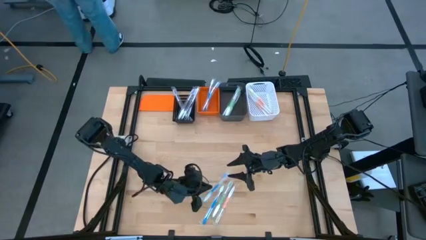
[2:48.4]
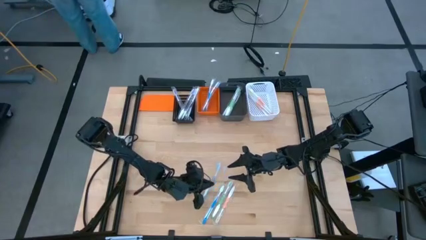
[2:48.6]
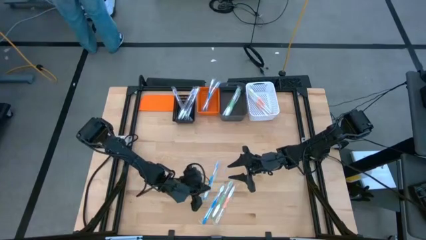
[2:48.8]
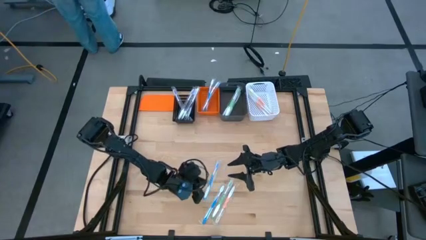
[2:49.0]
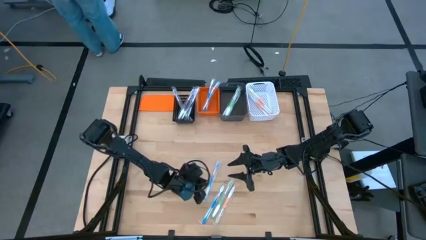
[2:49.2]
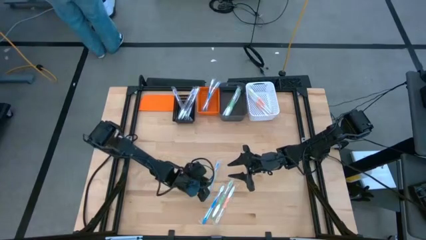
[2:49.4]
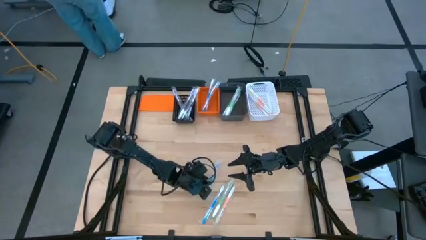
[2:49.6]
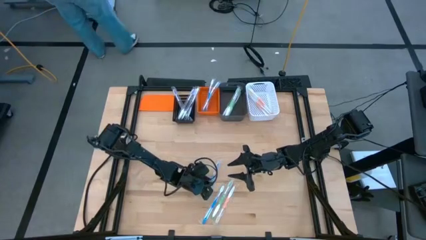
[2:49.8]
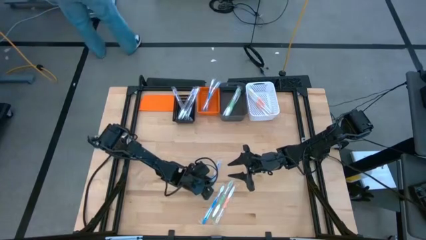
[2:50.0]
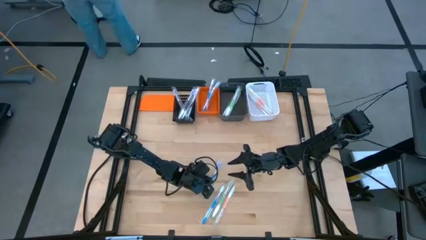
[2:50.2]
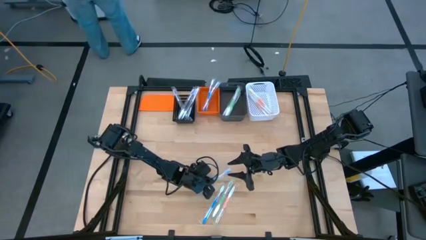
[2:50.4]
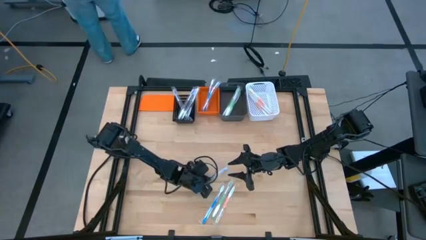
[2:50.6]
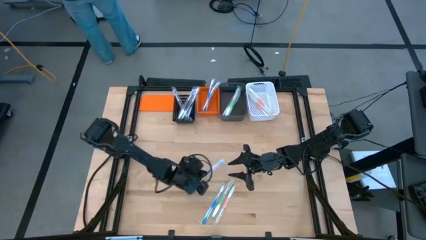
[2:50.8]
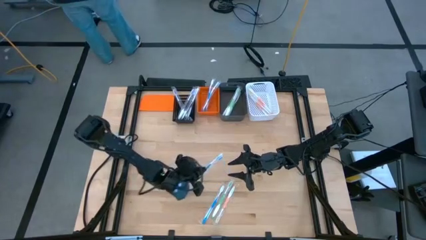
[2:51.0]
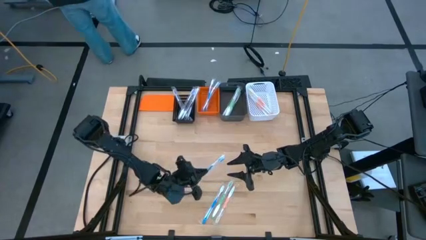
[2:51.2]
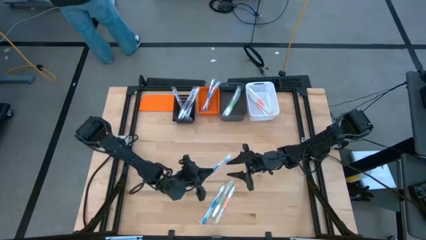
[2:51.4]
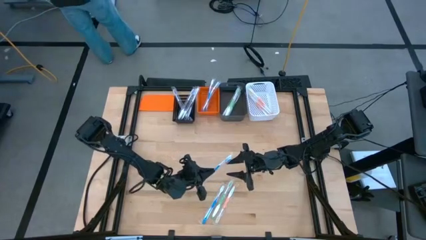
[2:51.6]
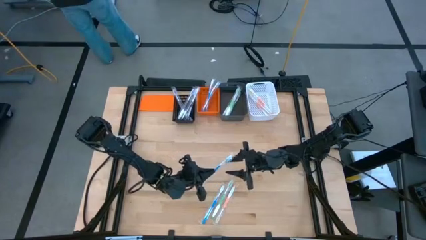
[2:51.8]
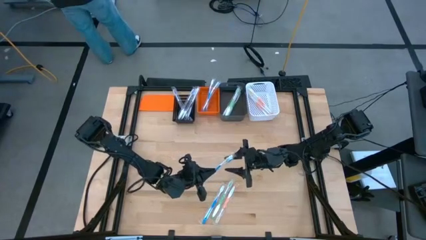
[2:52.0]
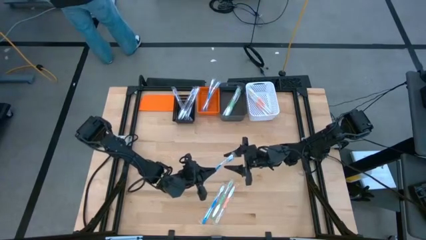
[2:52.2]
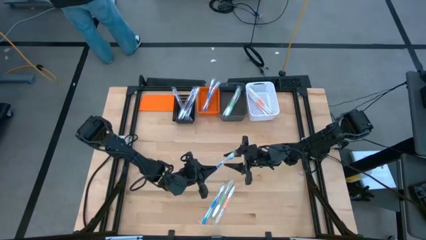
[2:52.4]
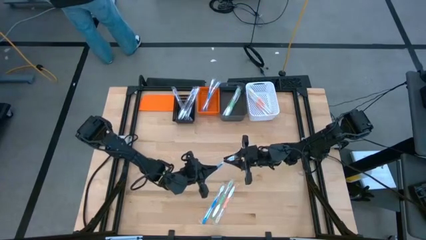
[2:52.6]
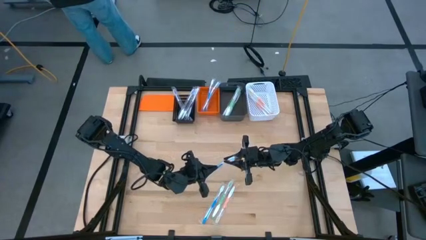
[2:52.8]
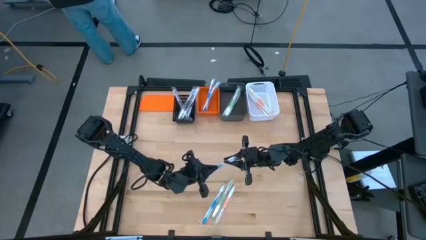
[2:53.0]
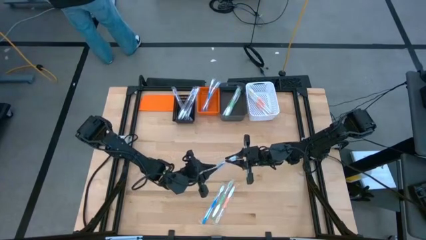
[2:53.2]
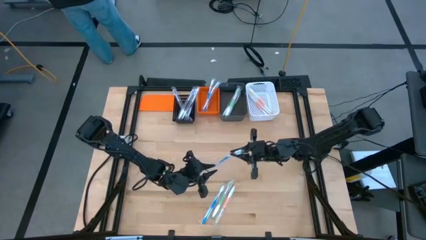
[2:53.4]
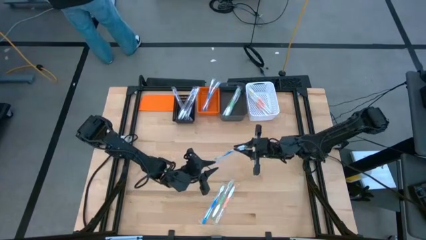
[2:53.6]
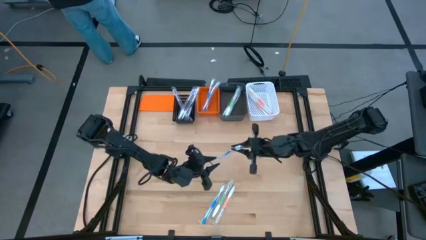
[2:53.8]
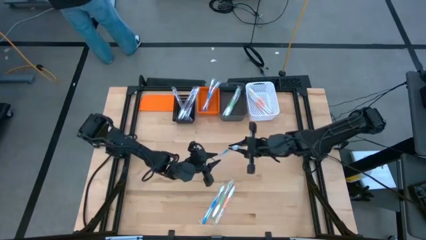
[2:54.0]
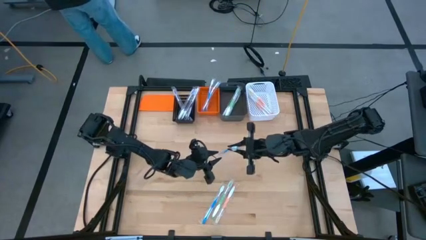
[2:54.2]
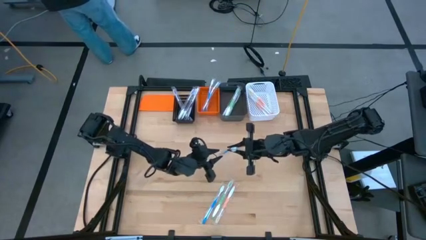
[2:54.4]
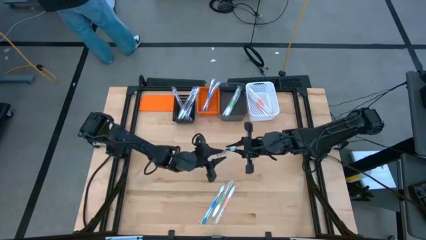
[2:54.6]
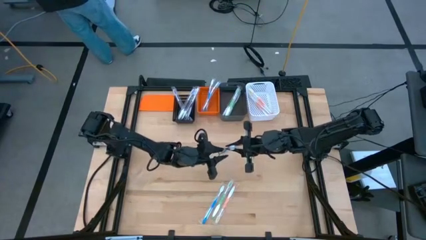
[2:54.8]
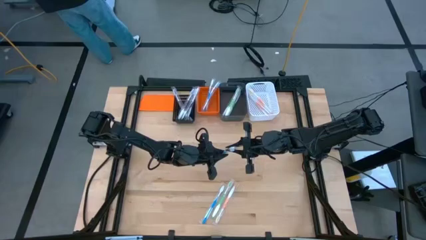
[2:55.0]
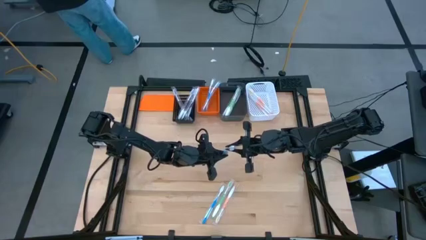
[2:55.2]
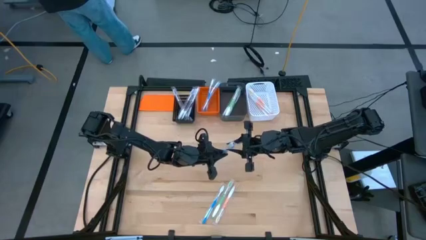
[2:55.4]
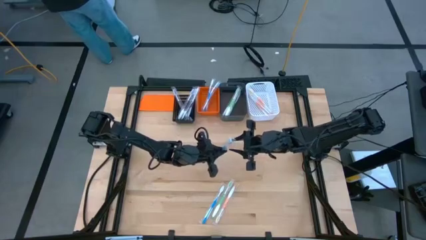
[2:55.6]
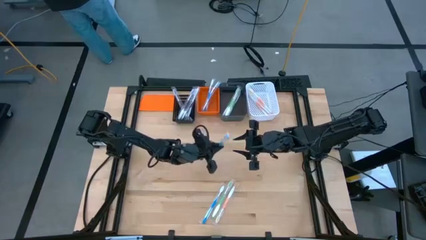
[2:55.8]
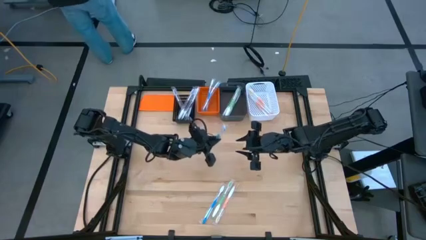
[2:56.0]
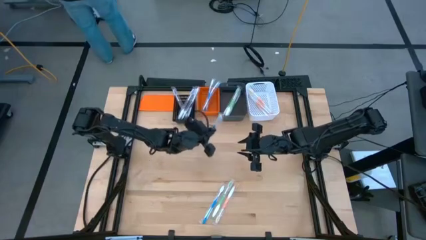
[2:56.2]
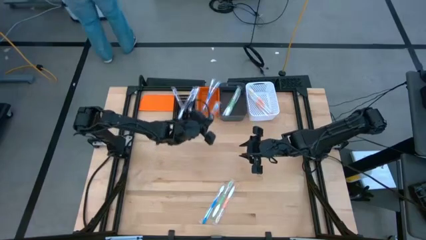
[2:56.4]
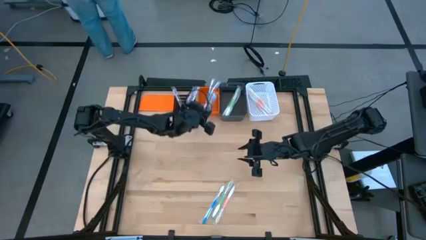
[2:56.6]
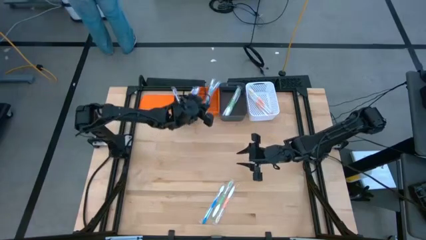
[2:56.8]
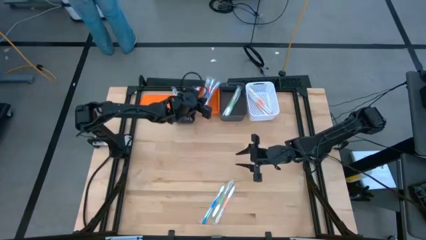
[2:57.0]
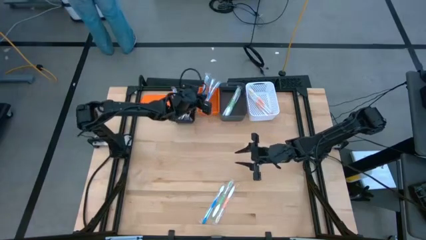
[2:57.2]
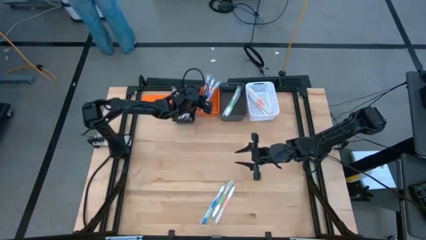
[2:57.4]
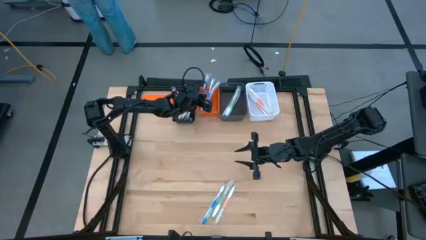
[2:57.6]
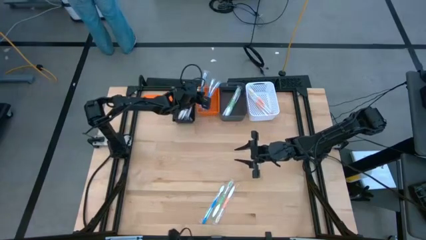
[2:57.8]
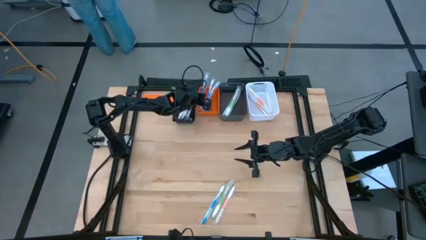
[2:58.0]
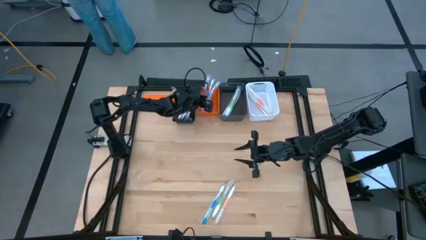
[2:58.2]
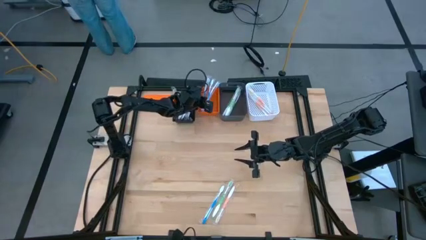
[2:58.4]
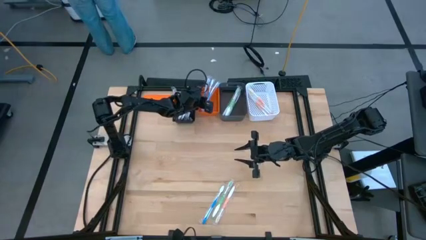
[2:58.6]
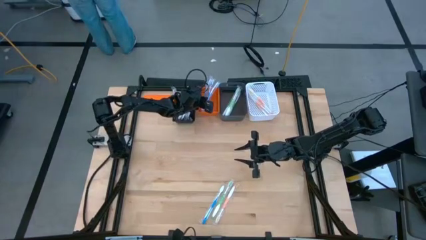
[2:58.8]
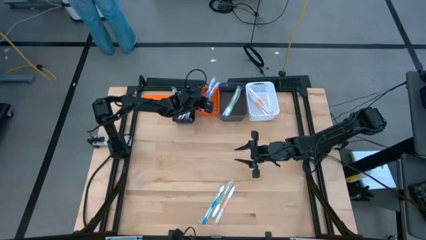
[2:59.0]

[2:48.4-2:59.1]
Task: Pick & Place Toothbrushes
Put the blue toothbrush into the orange basket

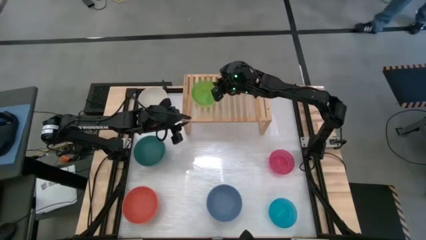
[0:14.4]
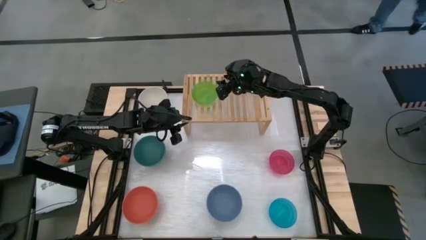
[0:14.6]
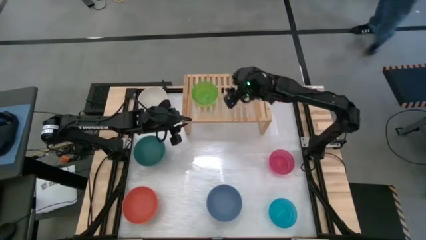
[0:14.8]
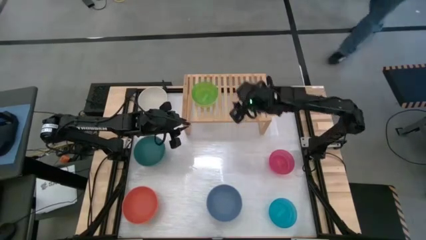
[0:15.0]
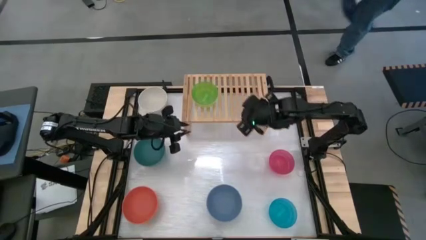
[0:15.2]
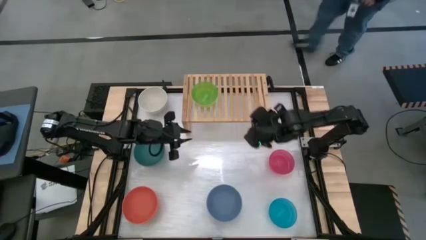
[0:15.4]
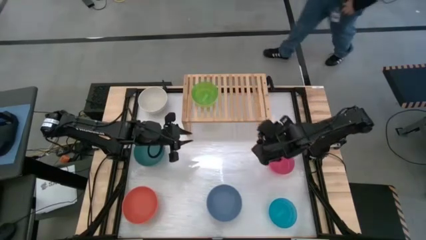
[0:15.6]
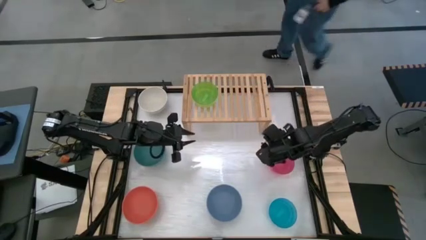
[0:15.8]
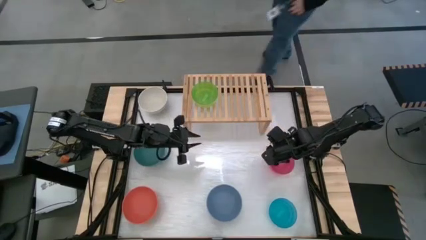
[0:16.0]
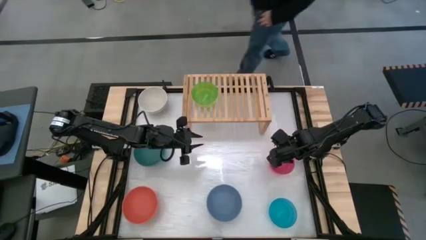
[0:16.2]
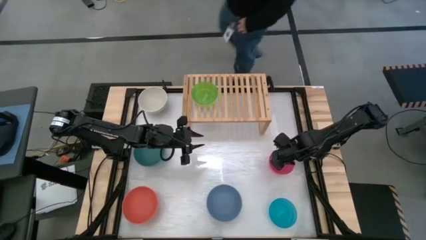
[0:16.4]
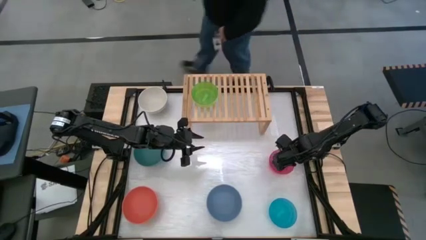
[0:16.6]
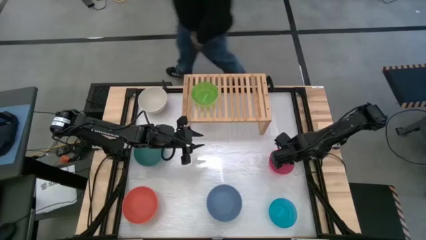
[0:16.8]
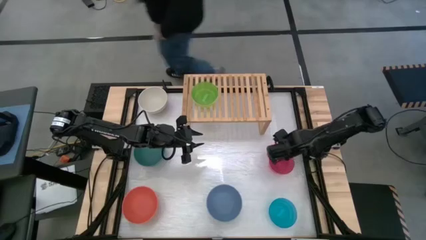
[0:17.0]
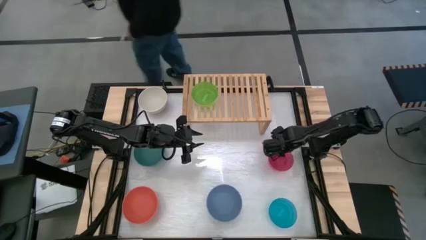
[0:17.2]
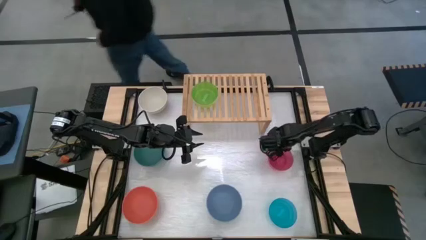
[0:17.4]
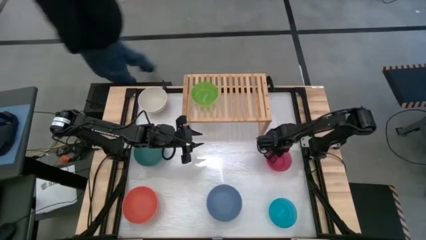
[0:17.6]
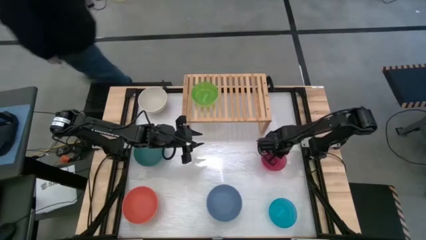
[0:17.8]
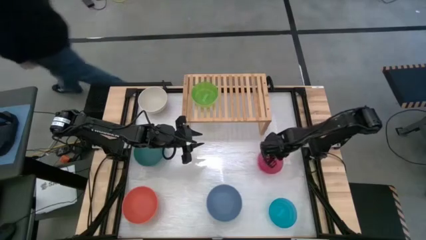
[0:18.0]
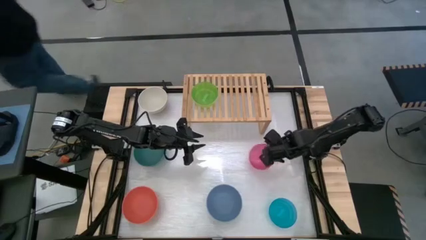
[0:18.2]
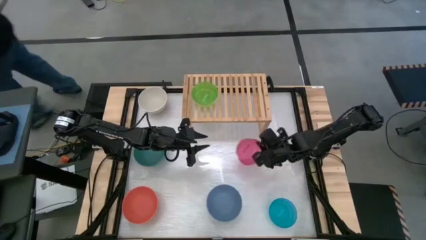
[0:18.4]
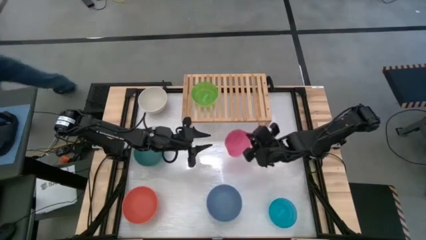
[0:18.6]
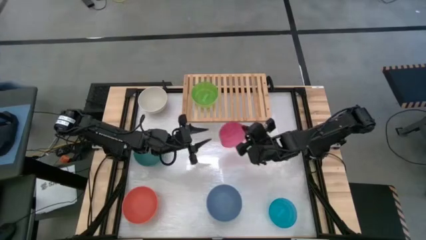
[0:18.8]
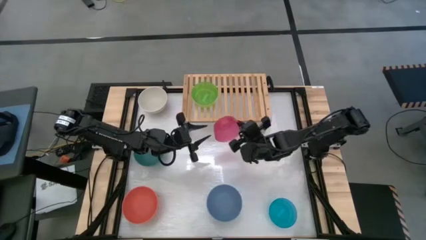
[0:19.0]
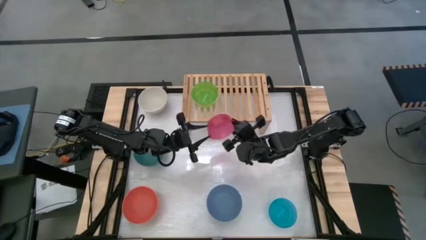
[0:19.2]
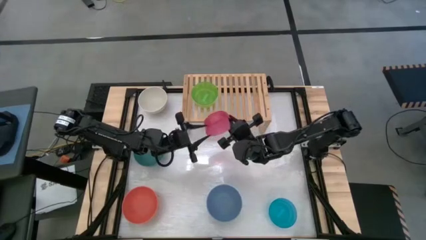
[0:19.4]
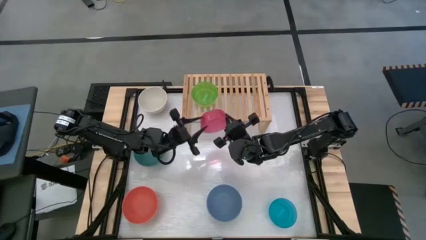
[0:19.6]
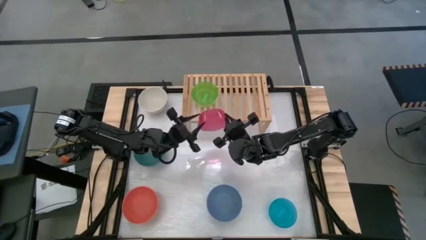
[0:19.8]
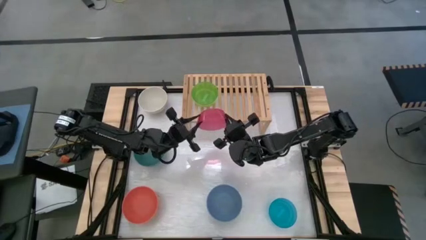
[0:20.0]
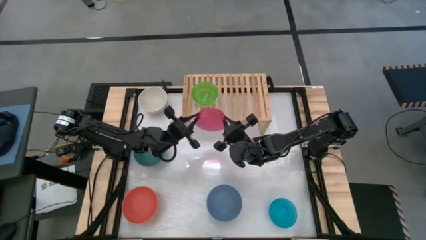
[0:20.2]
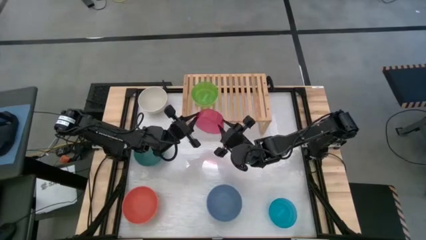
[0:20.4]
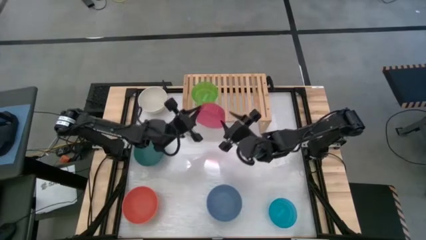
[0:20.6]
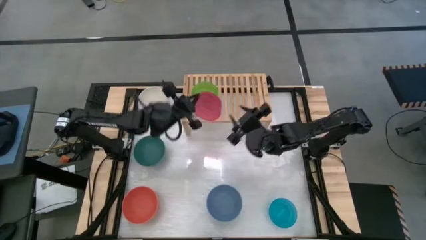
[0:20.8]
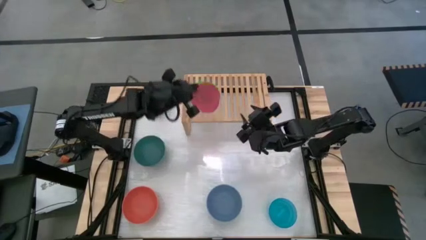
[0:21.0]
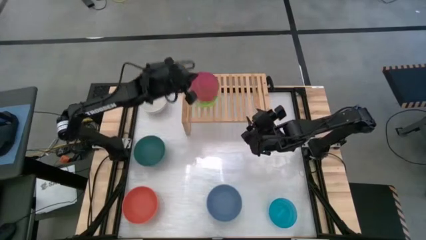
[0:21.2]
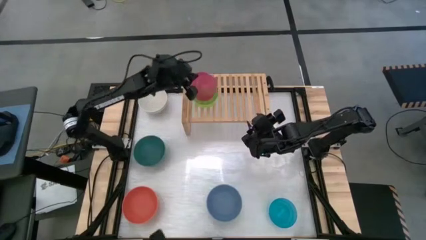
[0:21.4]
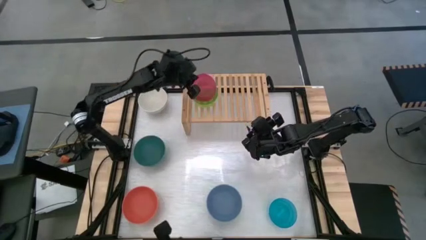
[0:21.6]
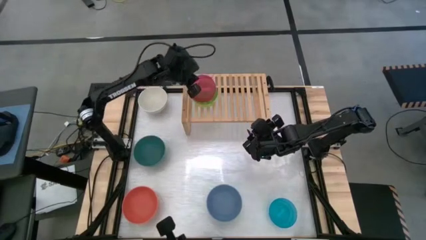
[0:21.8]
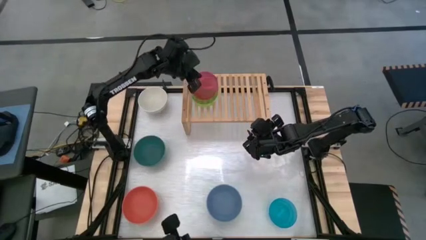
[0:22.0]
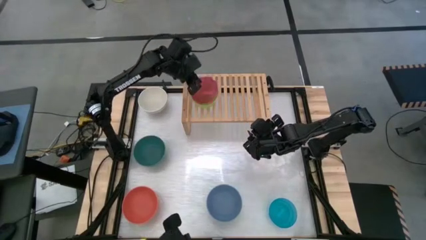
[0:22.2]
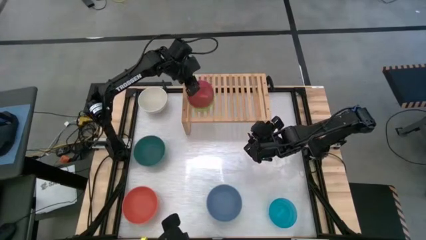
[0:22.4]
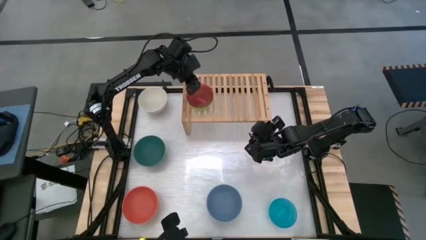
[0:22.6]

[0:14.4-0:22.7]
Task: Place and stack bowls onto a shelf
Stack the small pink bowl on top of the small light green bowls on the shelf
